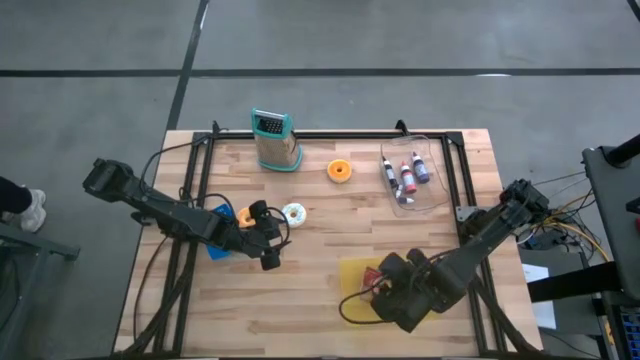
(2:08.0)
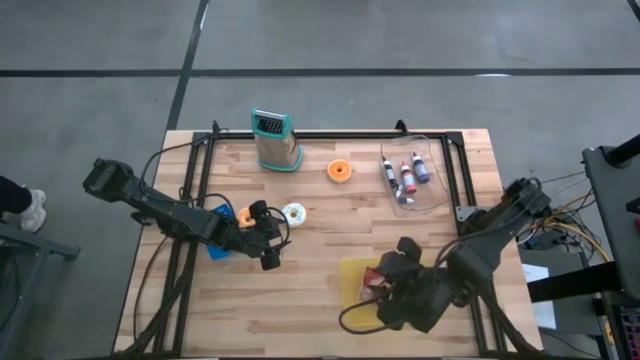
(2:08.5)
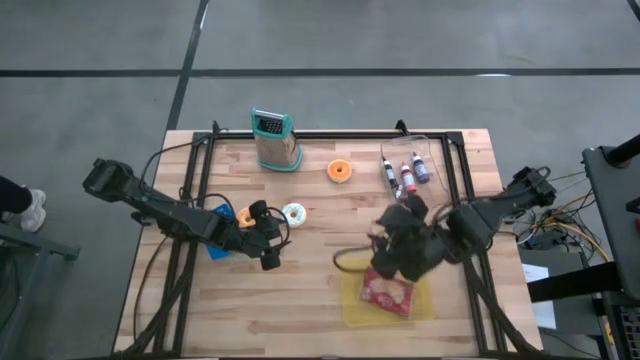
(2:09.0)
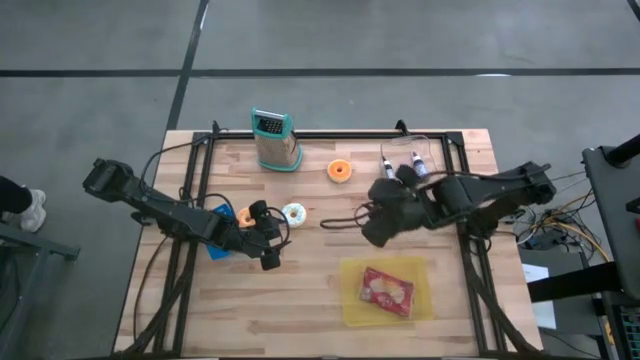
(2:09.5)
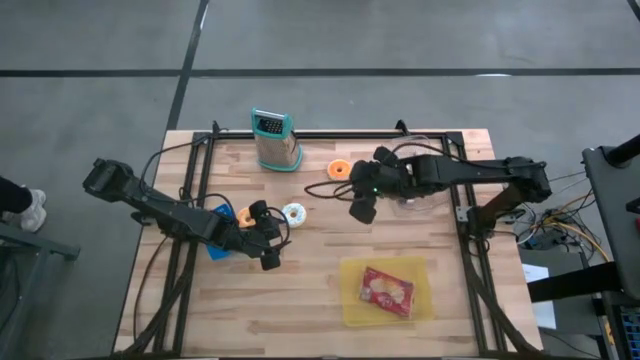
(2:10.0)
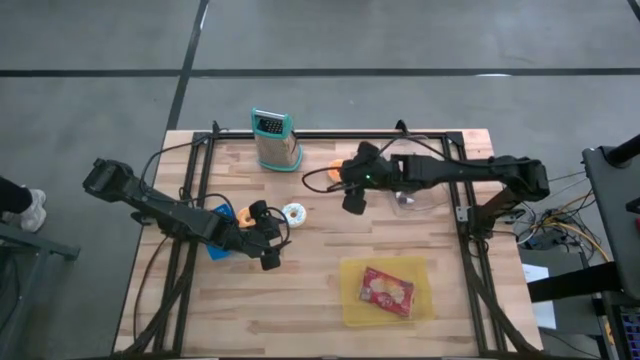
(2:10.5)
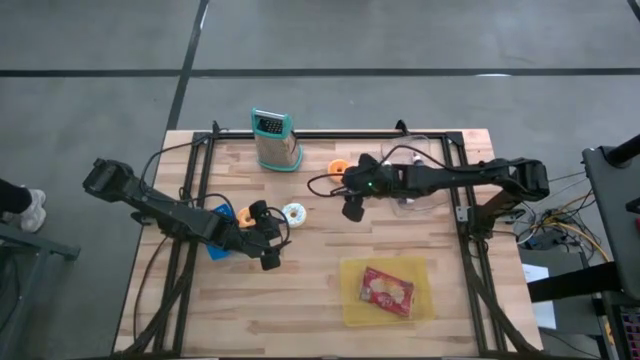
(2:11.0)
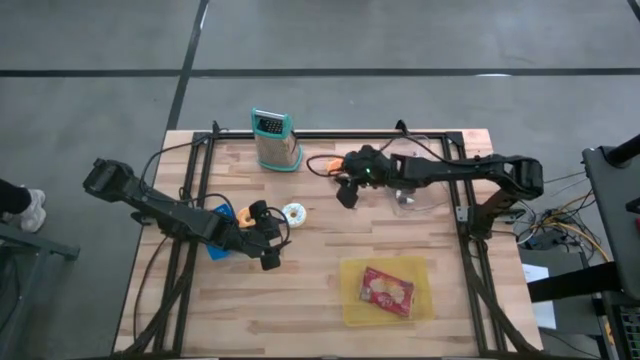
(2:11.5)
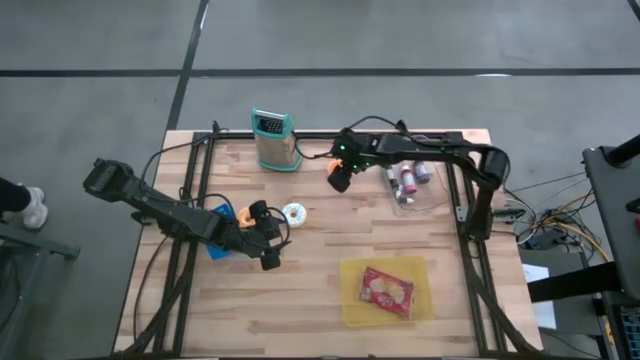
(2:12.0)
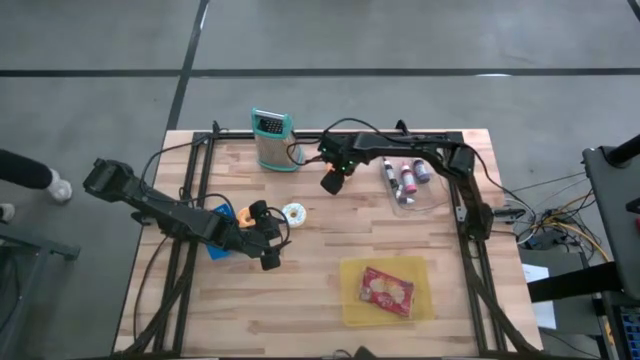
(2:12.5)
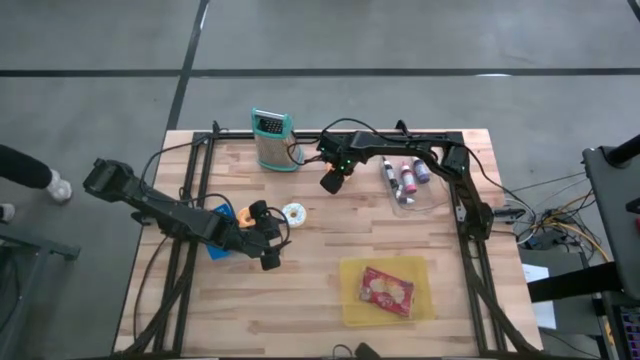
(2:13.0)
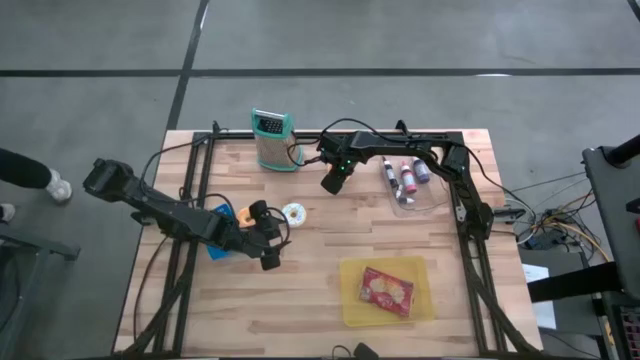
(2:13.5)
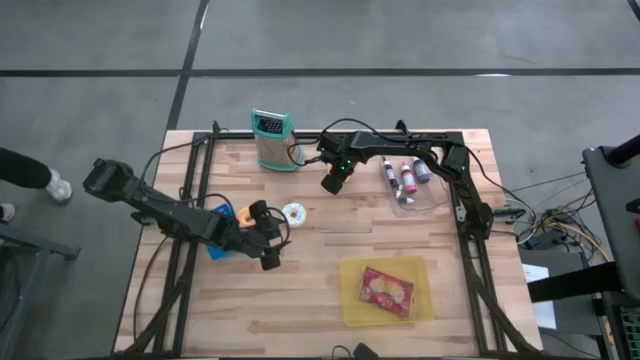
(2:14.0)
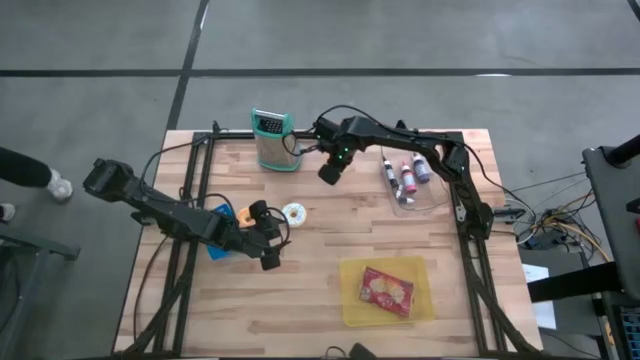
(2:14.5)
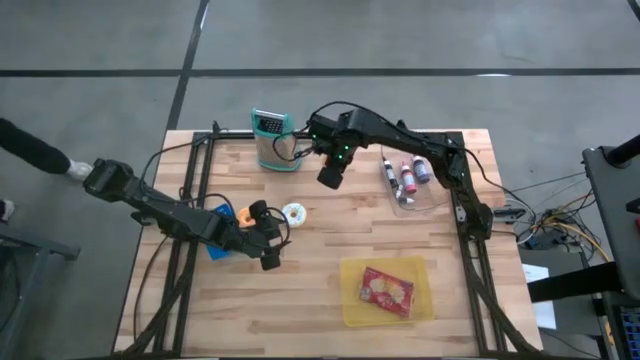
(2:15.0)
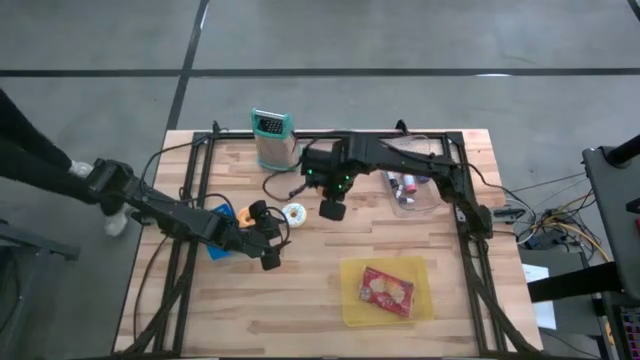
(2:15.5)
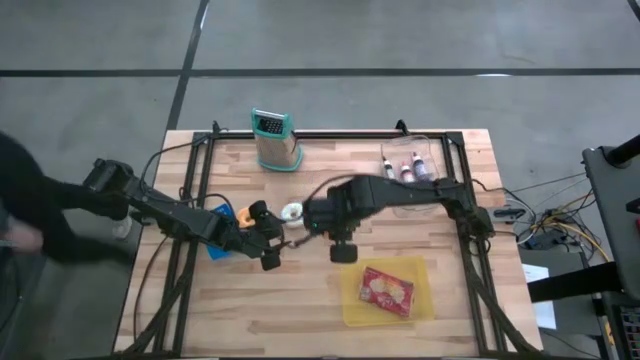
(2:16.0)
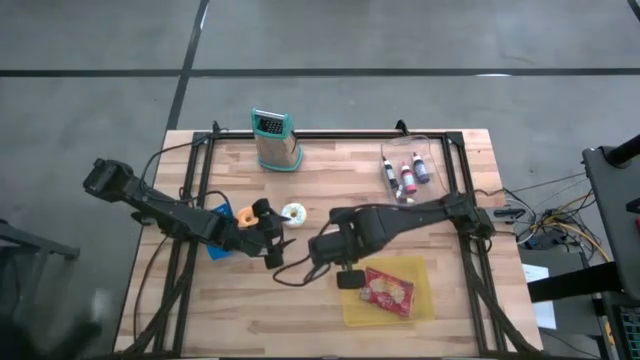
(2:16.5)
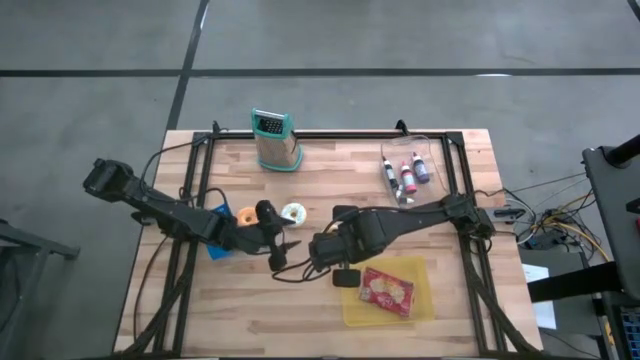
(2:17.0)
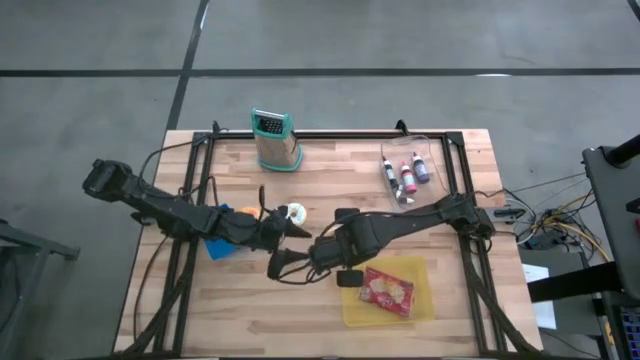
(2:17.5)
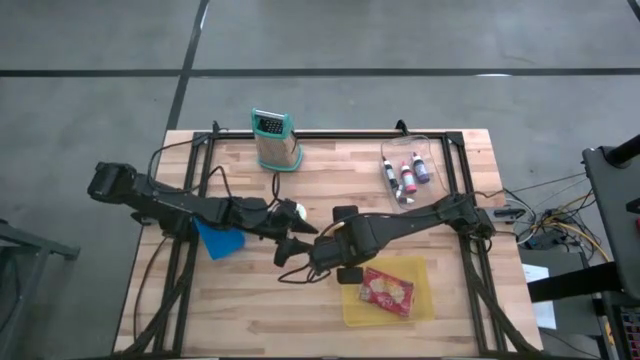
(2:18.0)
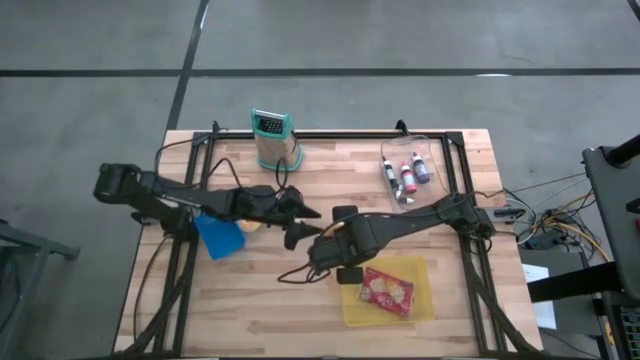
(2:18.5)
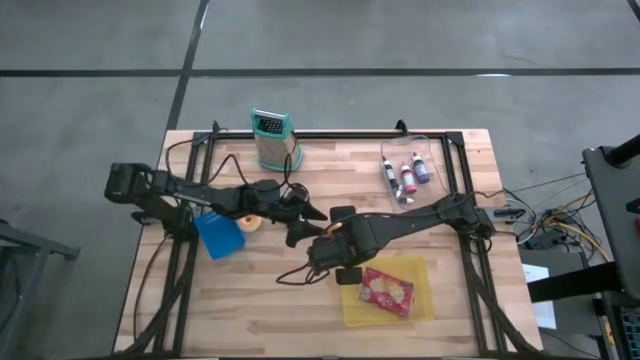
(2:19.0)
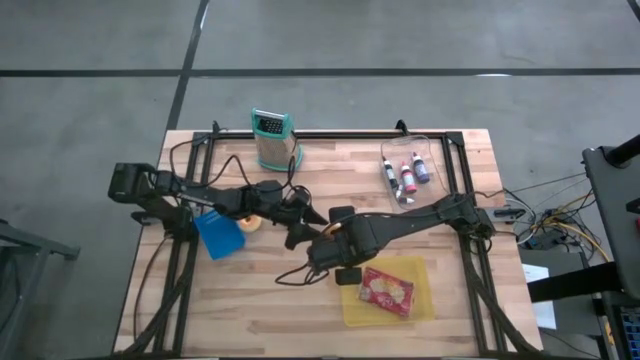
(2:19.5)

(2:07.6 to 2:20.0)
Task: Pick & Place Food Item
Put the top orange donut into the blue bin

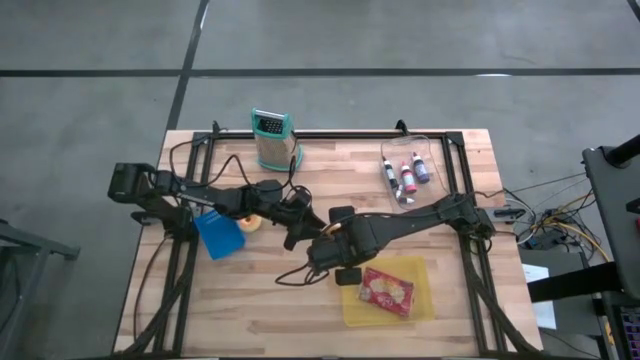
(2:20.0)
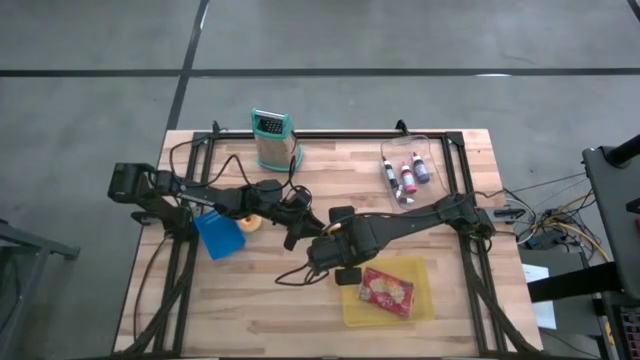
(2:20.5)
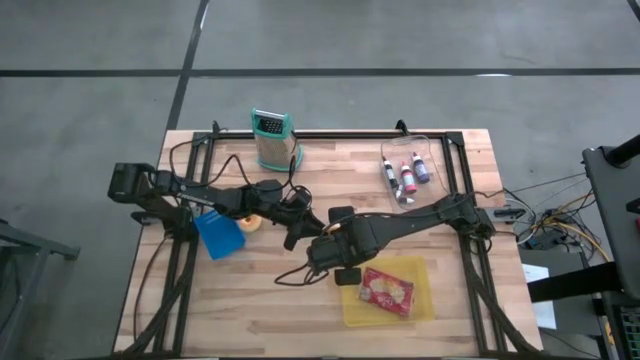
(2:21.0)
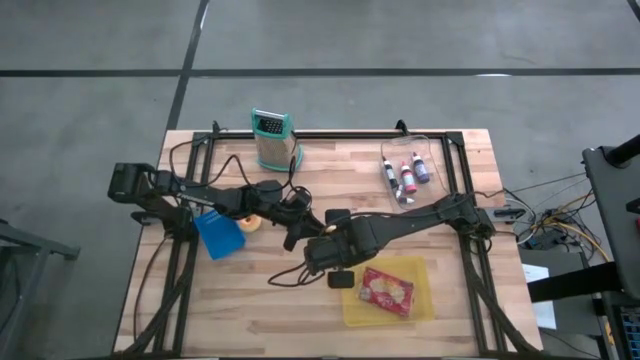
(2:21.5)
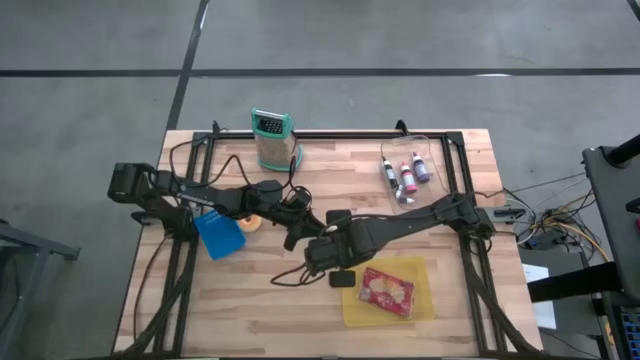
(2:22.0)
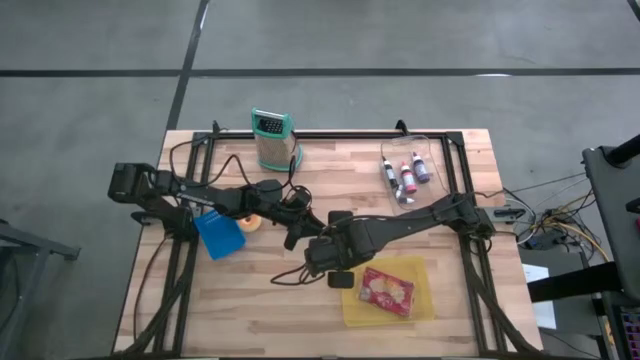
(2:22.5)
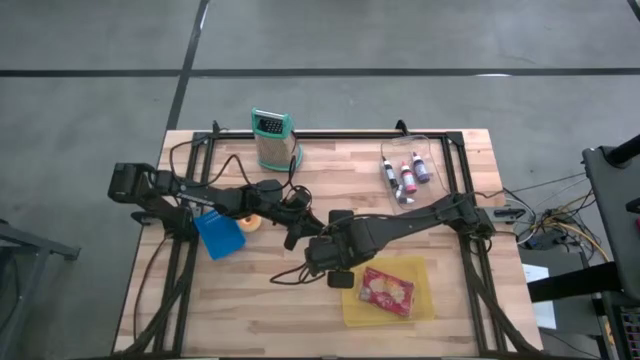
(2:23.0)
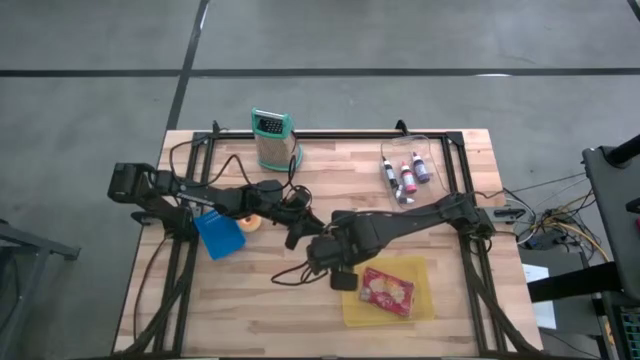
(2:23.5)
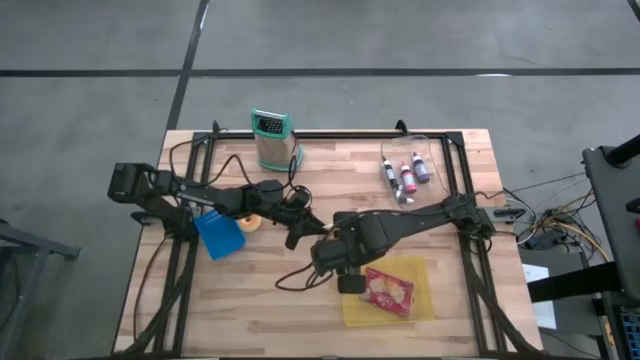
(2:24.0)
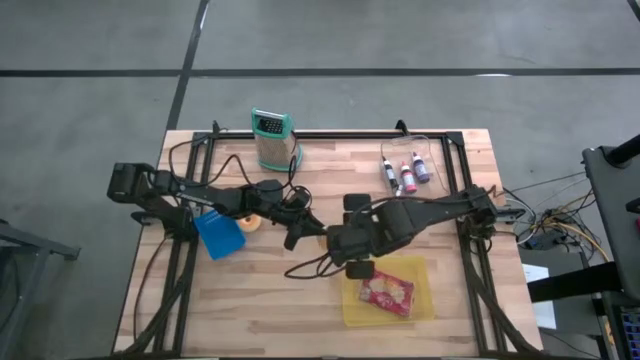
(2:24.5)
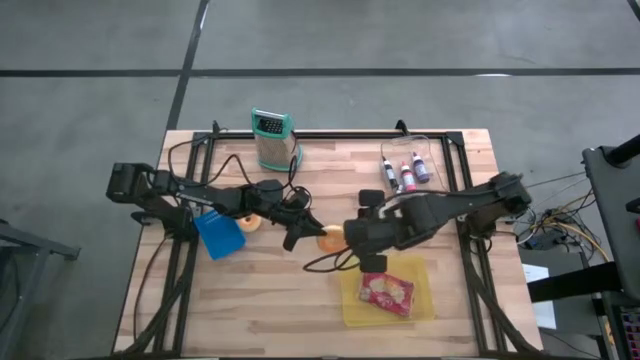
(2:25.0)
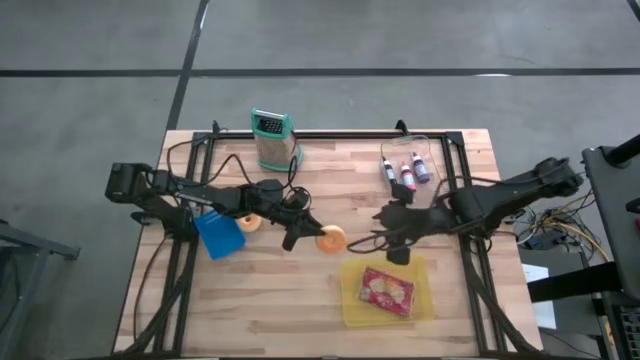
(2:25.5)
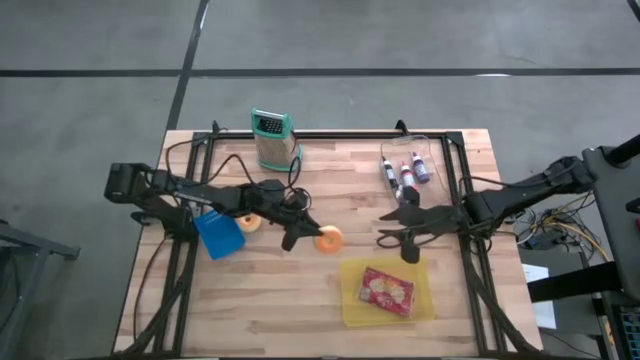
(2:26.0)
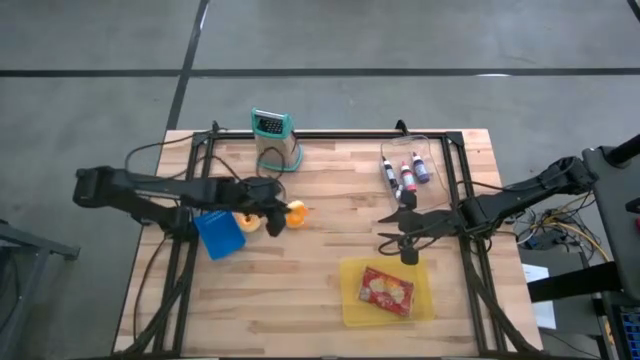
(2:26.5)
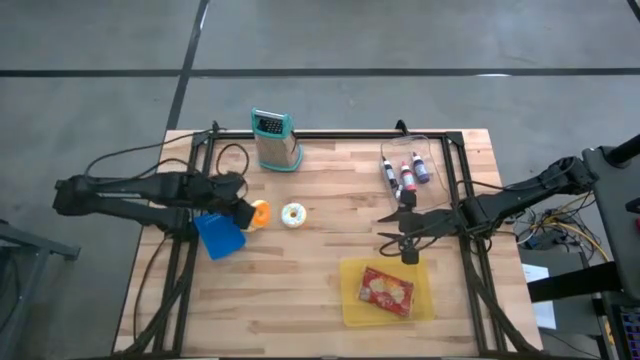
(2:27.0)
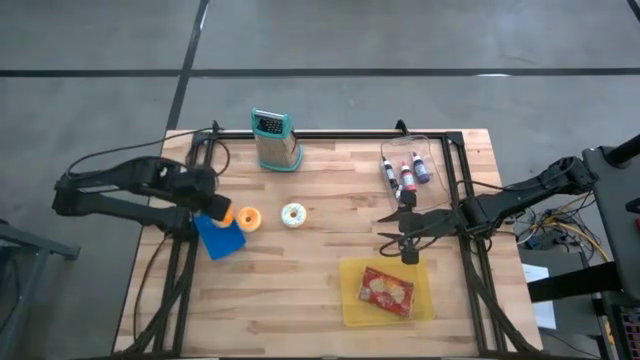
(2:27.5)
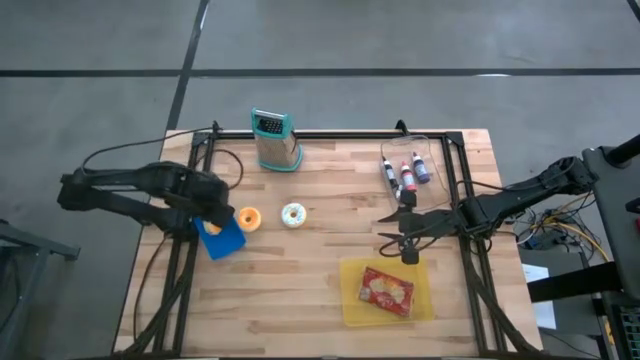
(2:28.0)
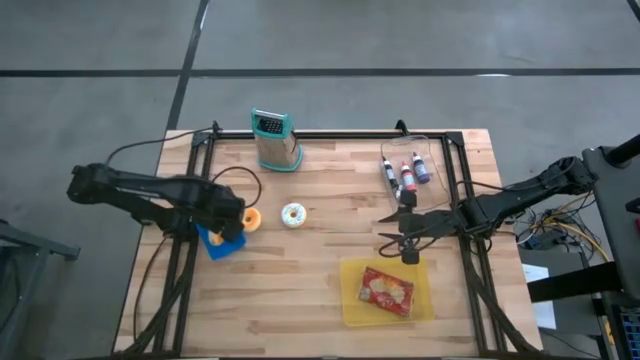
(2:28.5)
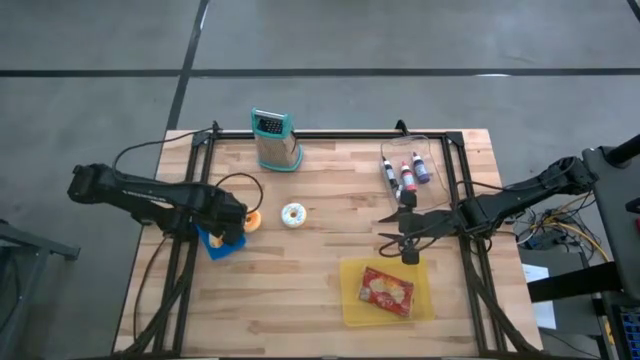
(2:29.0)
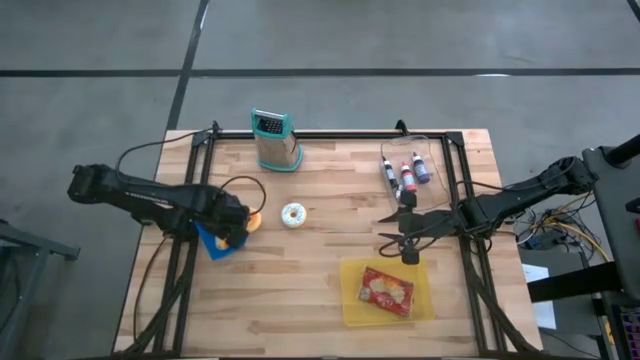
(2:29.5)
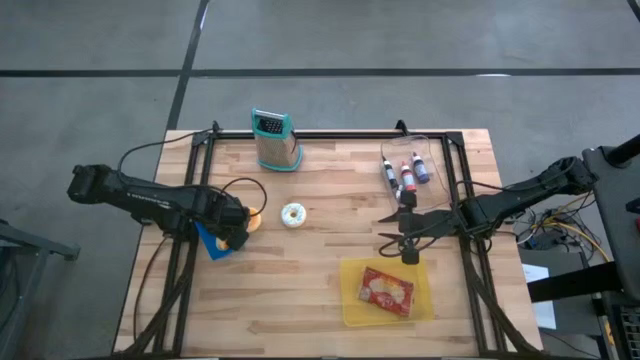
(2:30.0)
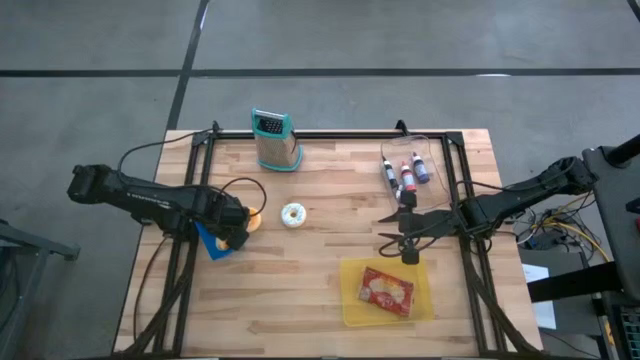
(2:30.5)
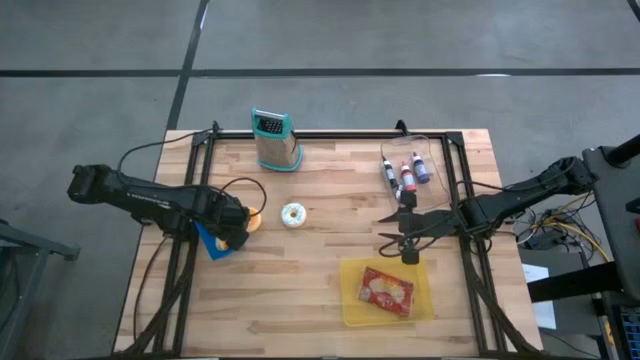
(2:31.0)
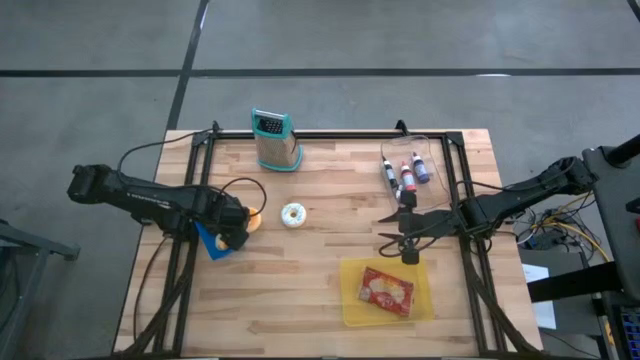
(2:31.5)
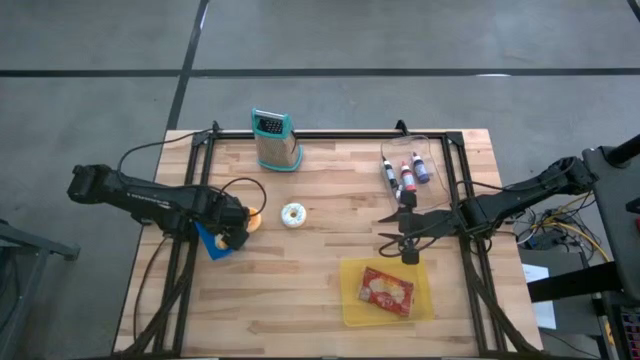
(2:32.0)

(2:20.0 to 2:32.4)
Put the top orange donut into the blue bin
